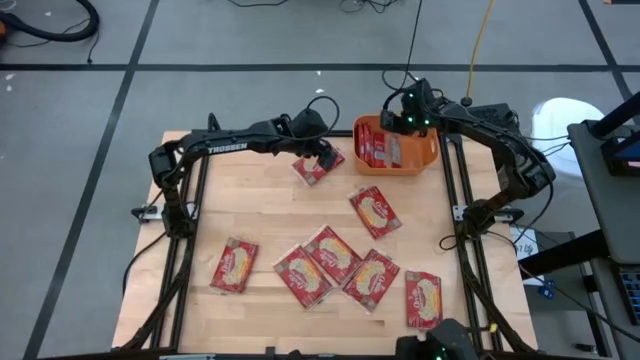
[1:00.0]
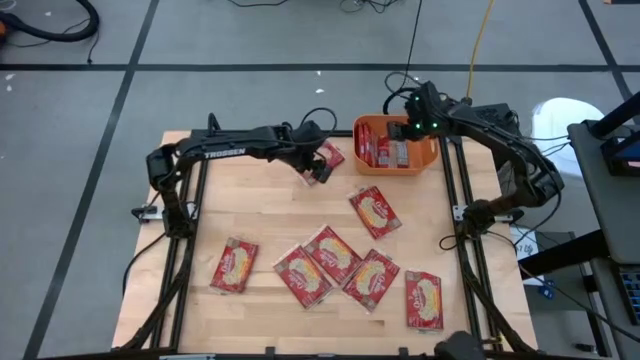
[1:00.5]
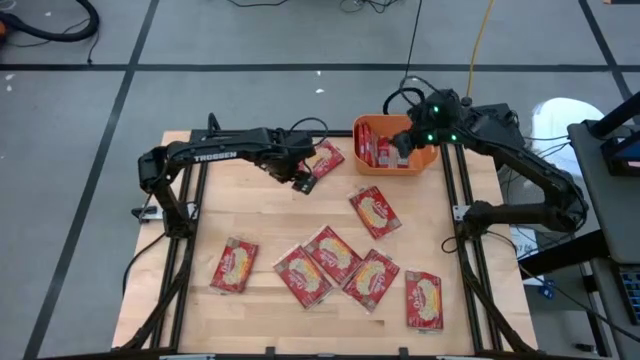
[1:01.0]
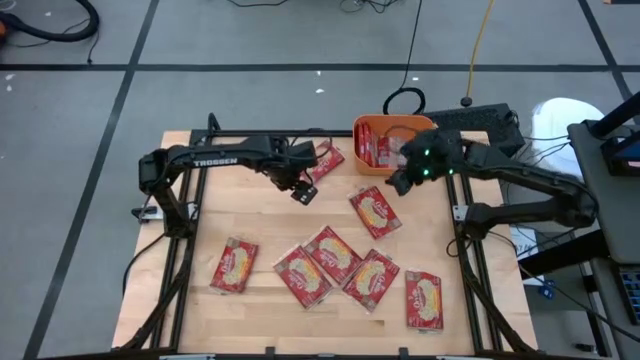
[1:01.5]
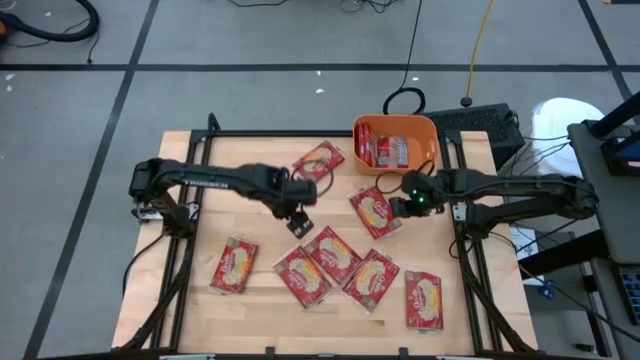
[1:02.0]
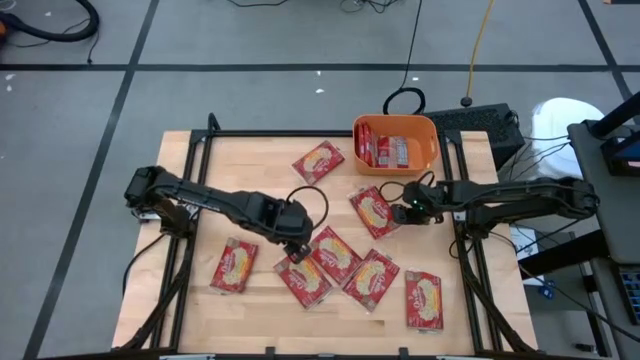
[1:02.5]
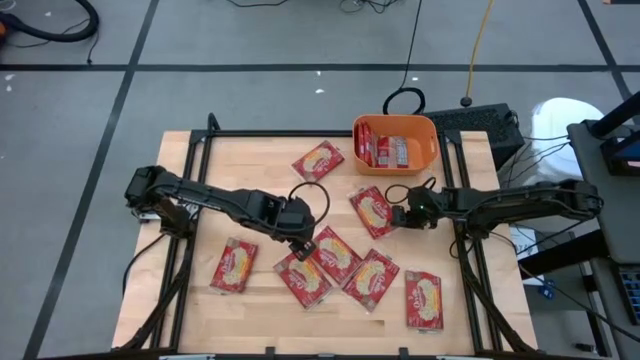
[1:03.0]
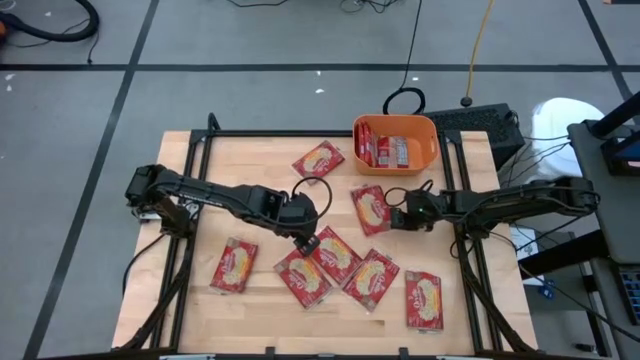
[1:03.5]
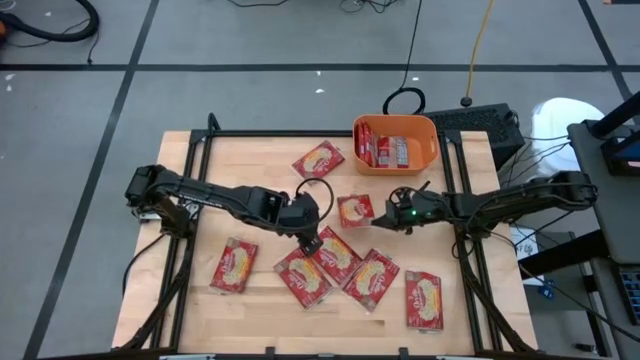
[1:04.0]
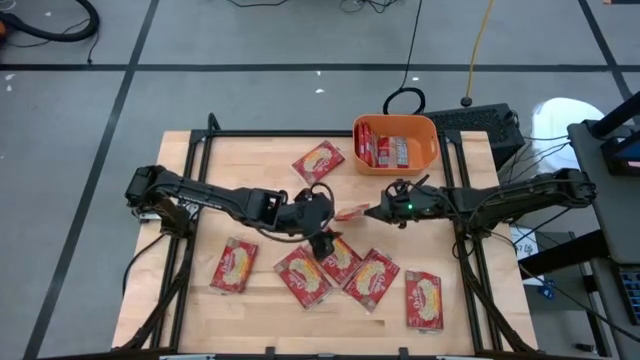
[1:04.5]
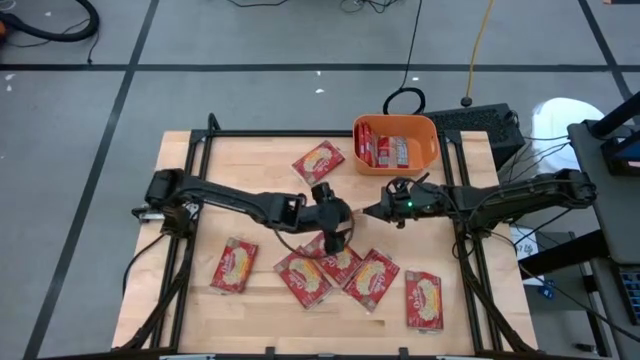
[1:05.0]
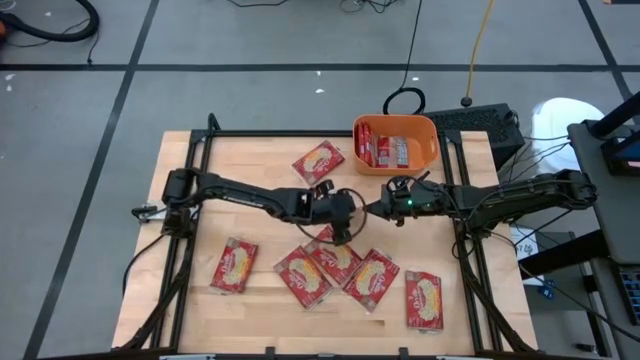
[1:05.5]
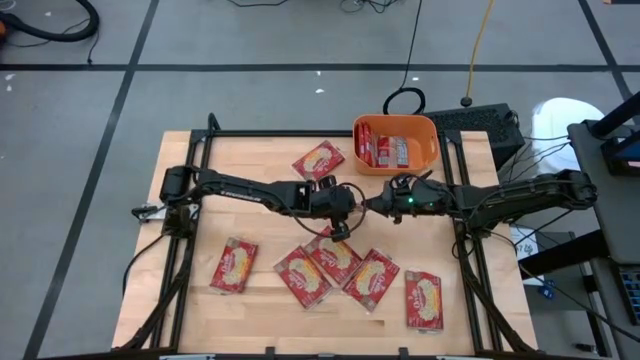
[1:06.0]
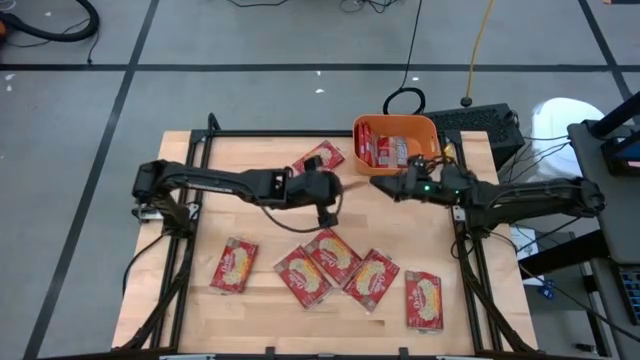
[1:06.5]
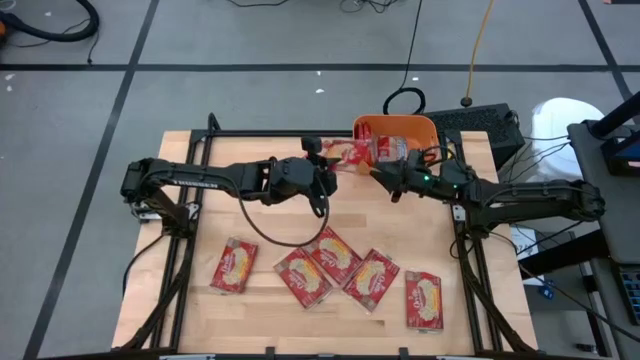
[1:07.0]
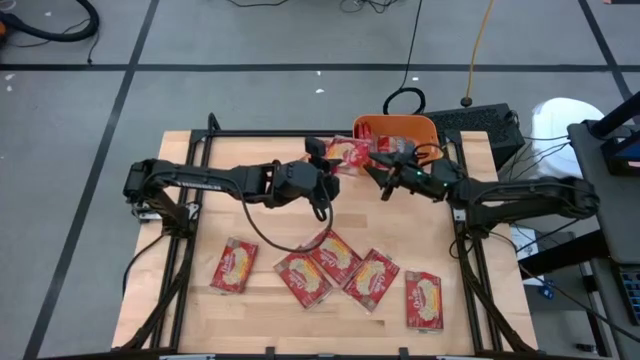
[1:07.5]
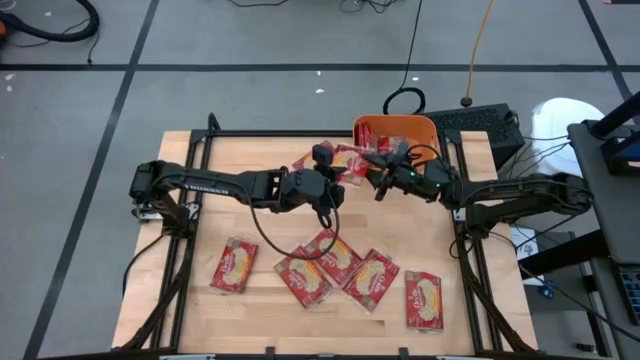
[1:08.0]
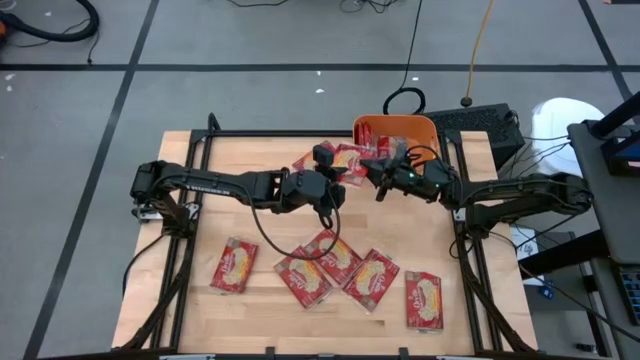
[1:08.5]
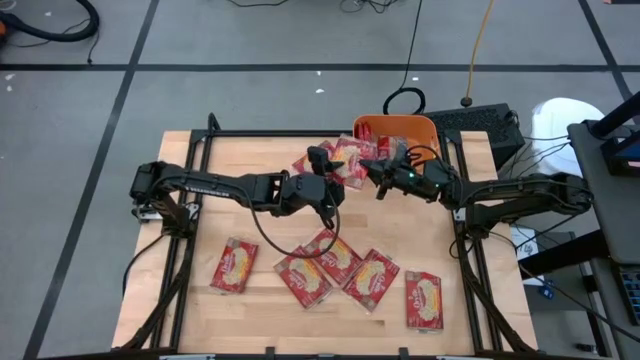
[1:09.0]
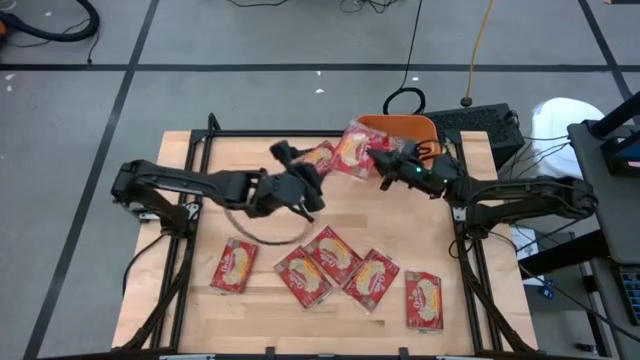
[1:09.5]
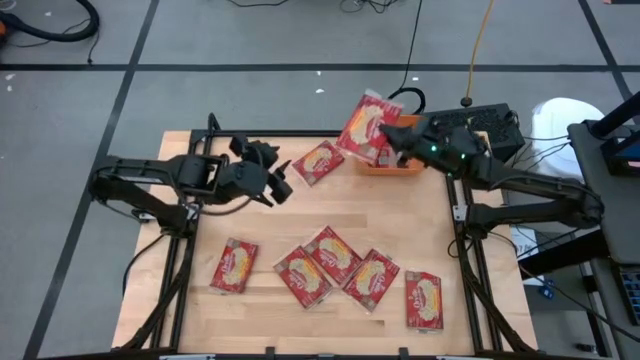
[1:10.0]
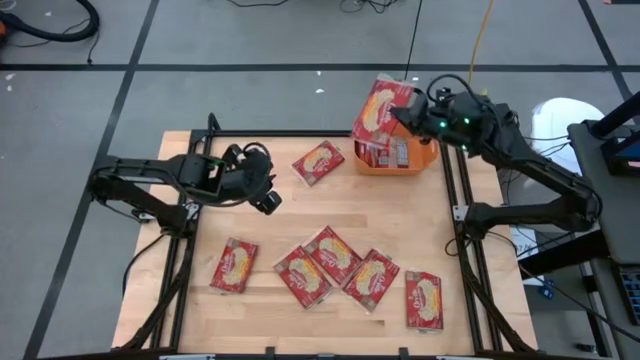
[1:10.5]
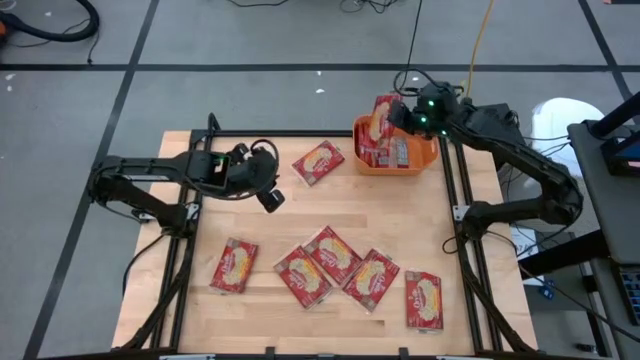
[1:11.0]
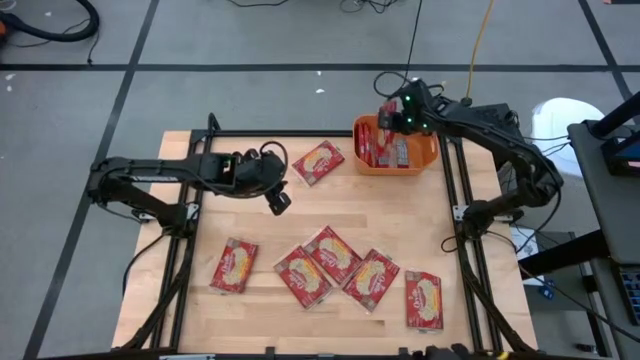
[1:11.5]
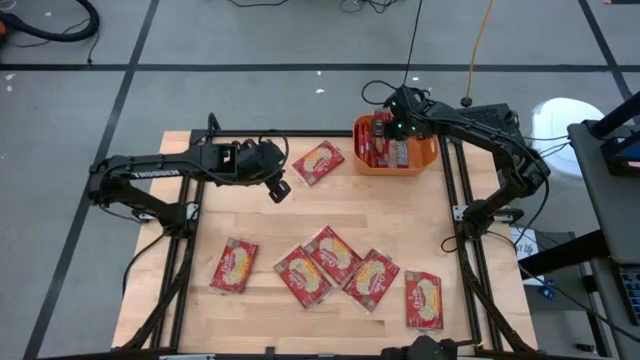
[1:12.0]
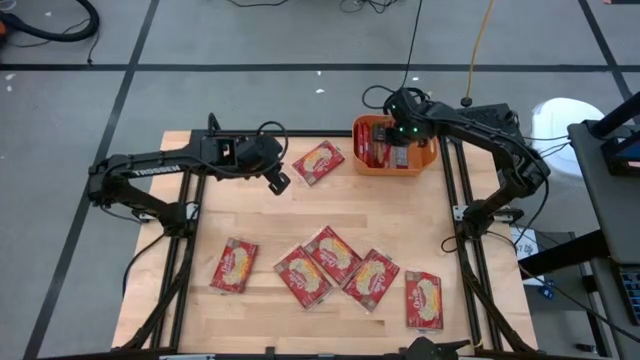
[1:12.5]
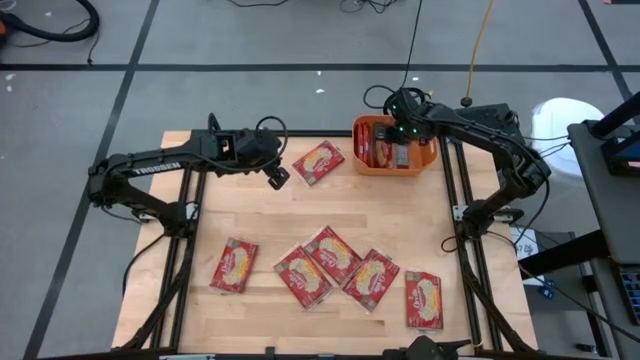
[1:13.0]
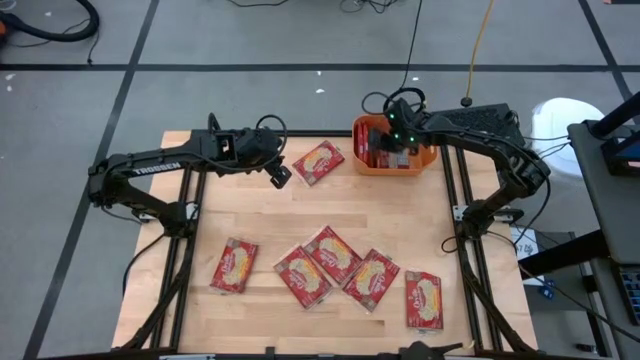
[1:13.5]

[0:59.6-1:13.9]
Task: Sort popcorn bags into baskets
Put the red popcorn bag into the orange bin

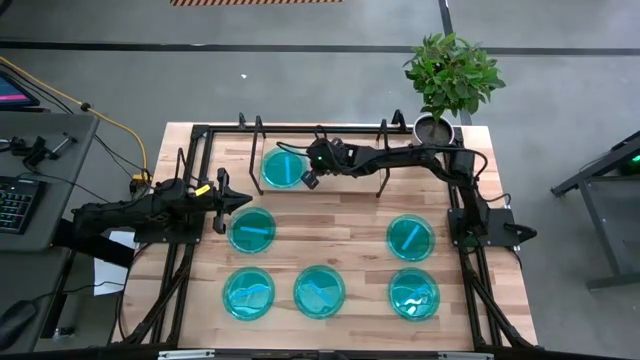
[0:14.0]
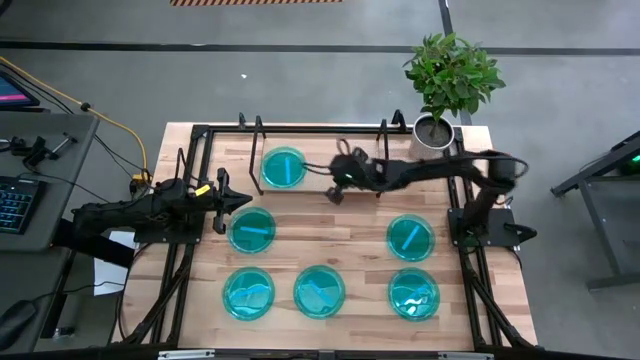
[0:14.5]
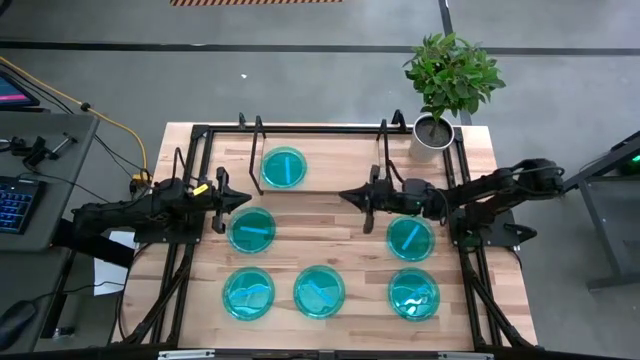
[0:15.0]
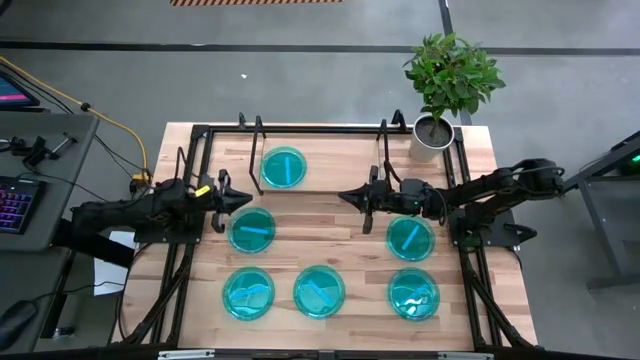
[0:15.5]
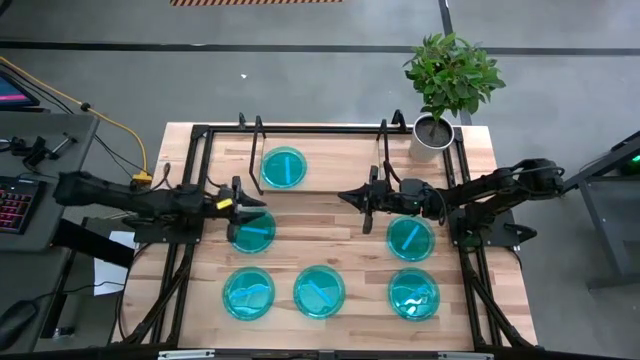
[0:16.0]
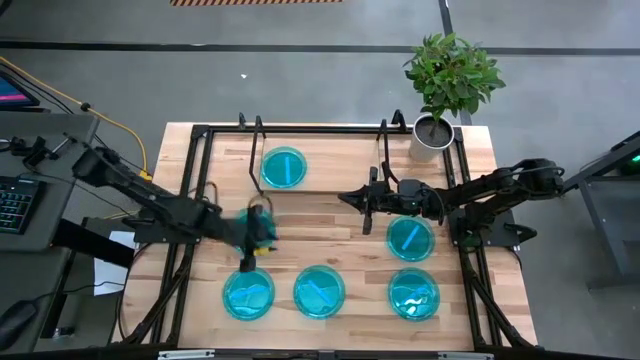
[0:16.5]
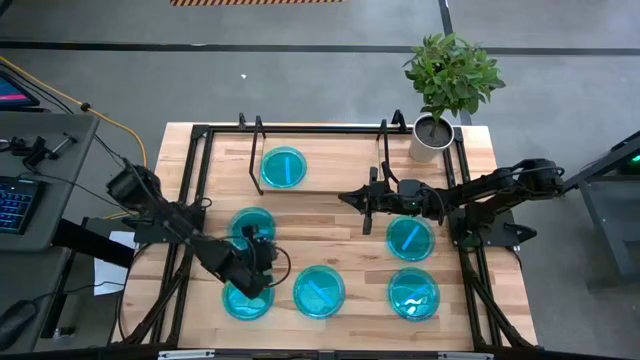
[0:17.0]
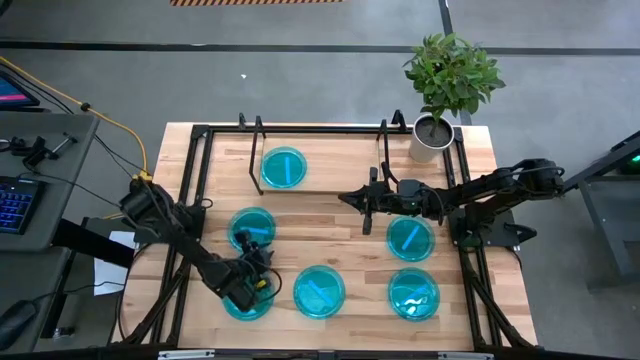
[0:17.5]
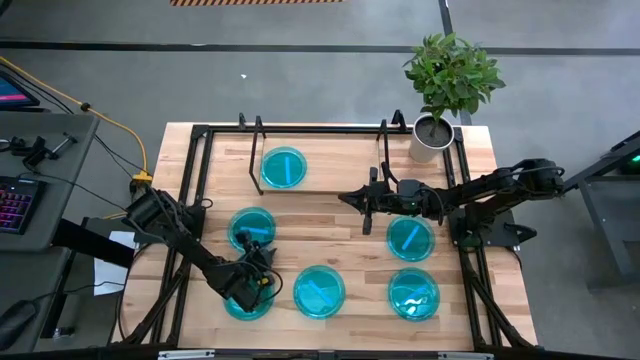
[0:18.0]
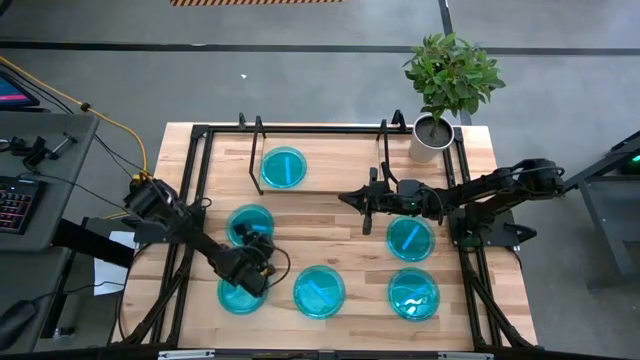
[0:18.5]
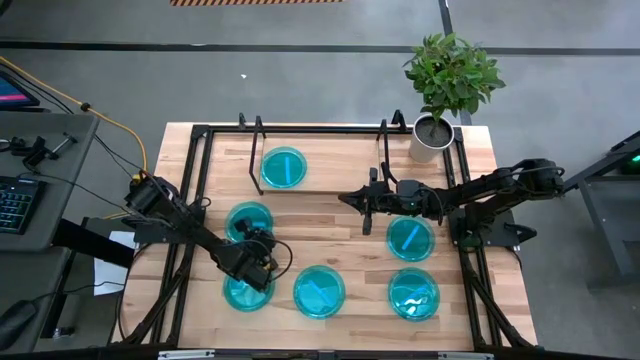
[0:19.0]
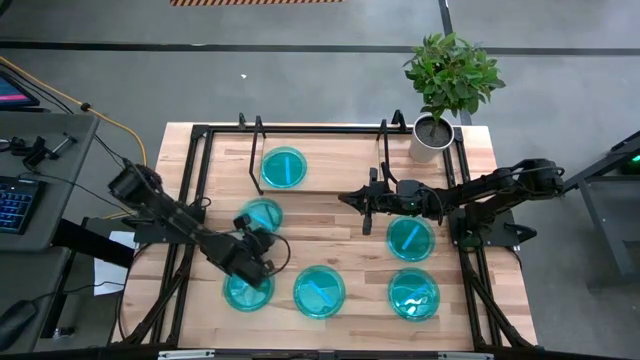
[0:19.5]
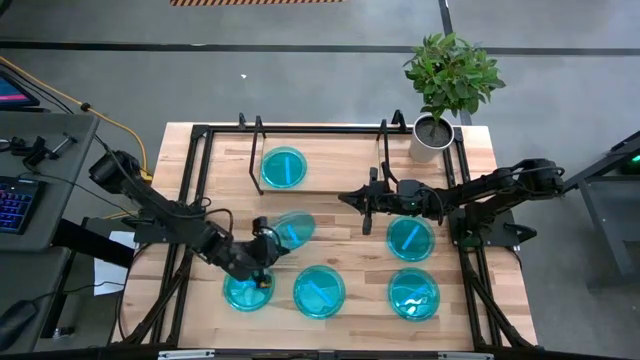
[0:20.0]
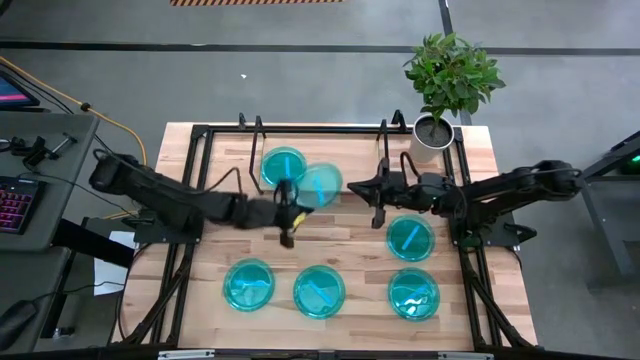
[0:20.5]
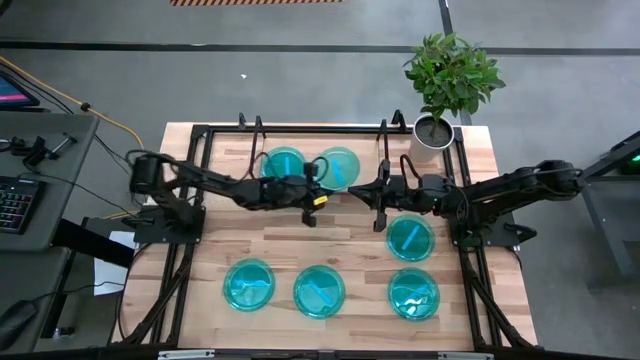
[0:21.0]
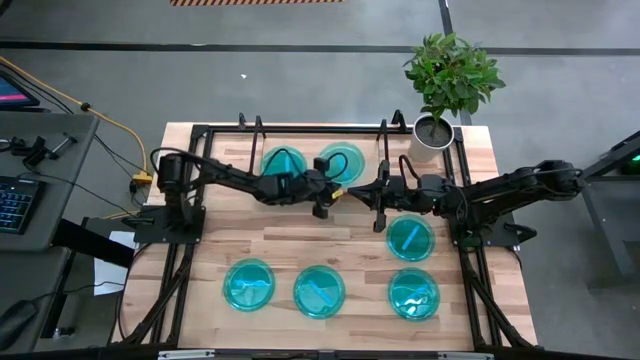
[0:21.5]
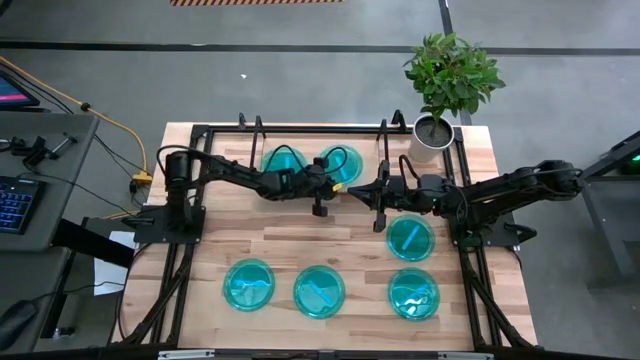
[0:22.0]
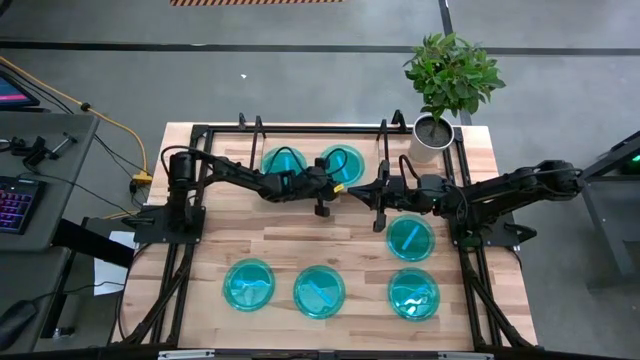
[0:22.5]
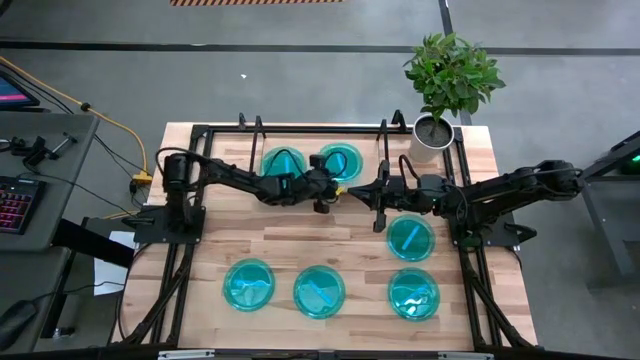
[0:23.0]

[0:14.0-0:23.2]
Task: Place and stack plates onto a shelf
Put the blue plate on the shelf
